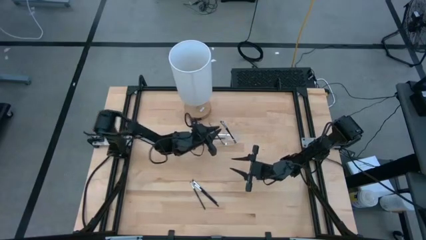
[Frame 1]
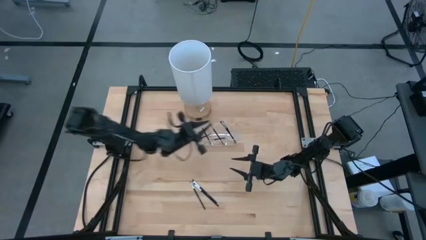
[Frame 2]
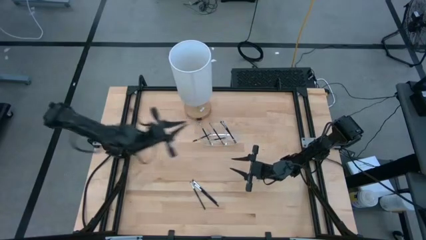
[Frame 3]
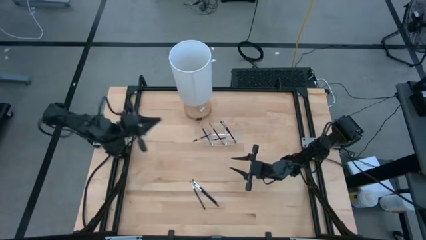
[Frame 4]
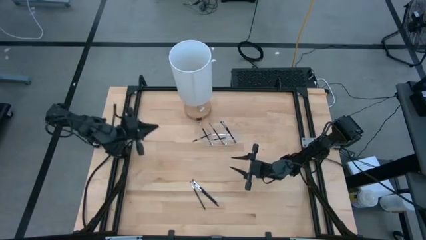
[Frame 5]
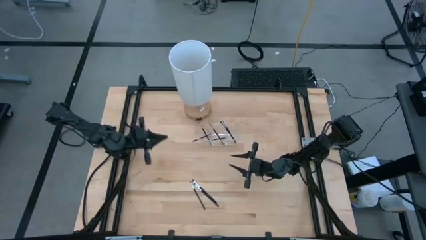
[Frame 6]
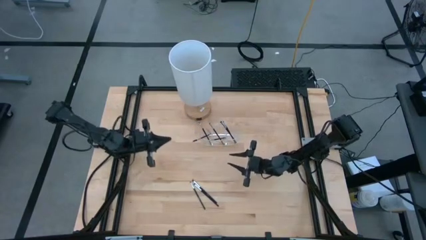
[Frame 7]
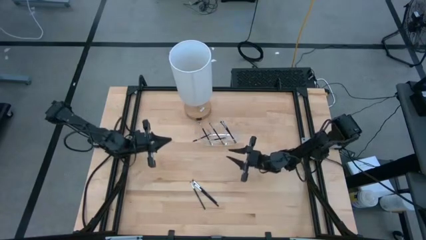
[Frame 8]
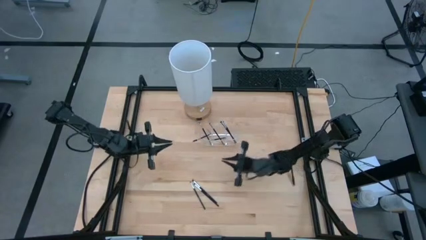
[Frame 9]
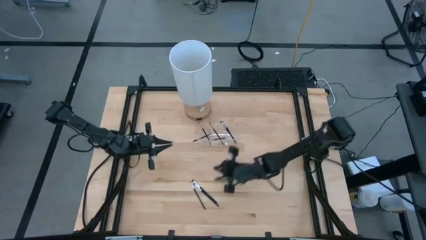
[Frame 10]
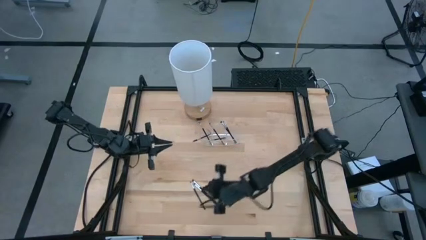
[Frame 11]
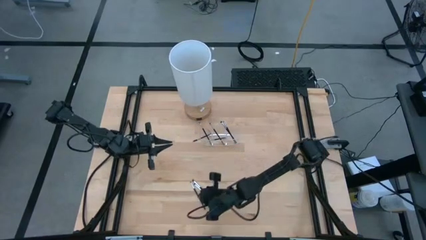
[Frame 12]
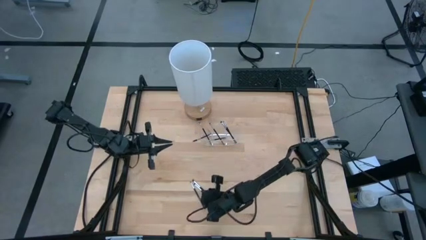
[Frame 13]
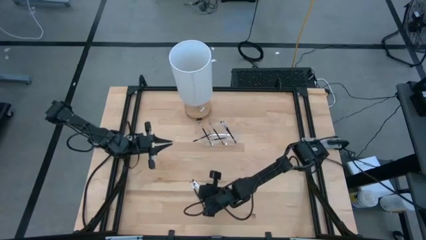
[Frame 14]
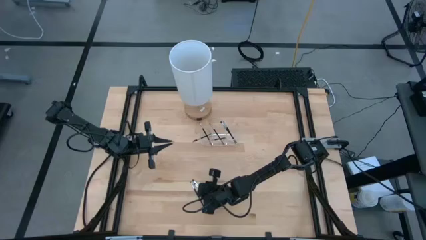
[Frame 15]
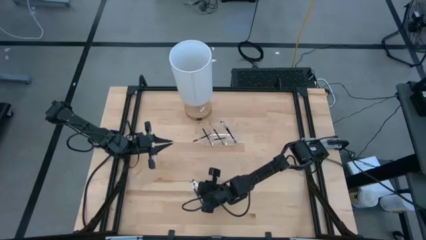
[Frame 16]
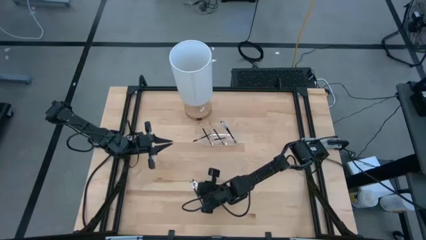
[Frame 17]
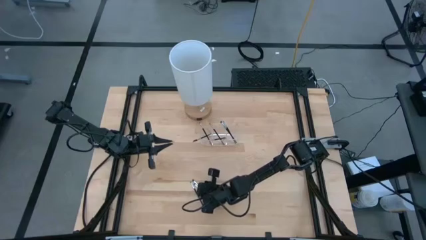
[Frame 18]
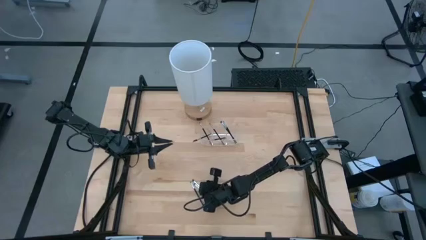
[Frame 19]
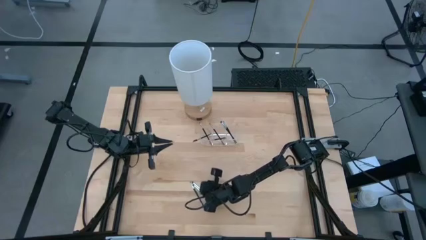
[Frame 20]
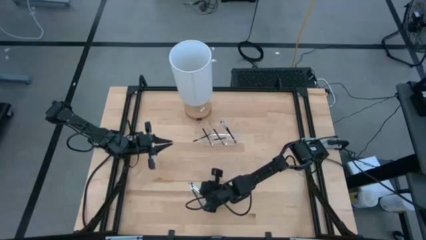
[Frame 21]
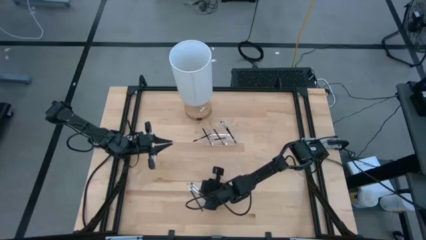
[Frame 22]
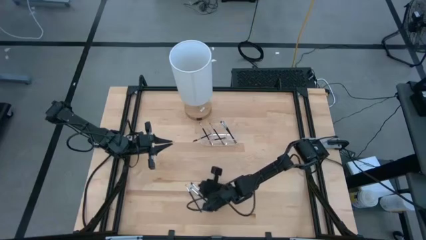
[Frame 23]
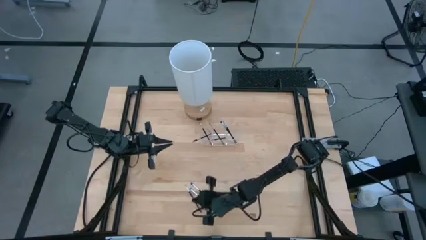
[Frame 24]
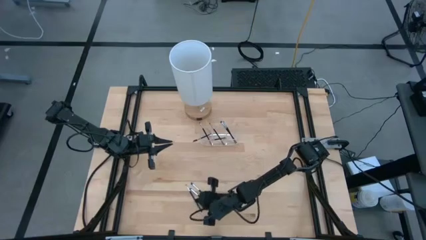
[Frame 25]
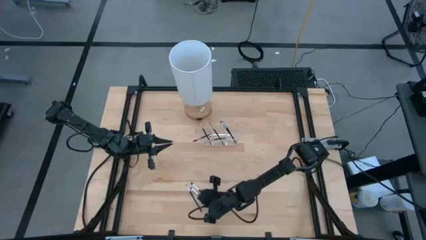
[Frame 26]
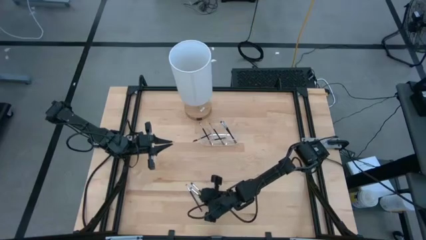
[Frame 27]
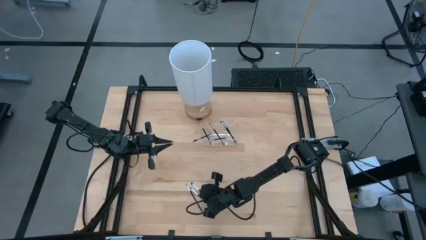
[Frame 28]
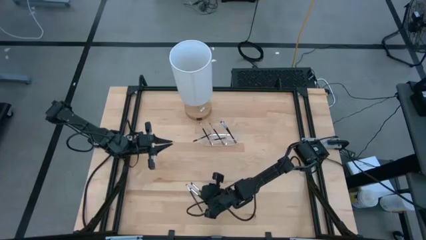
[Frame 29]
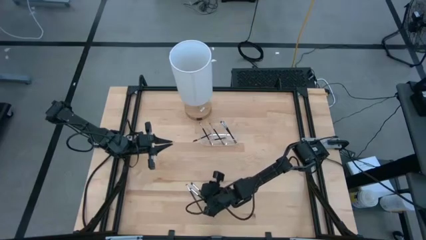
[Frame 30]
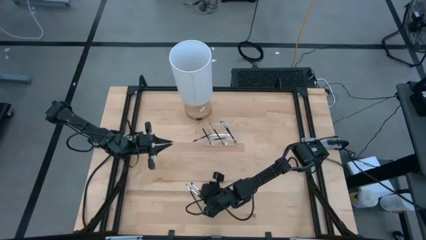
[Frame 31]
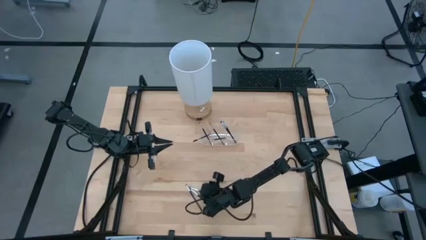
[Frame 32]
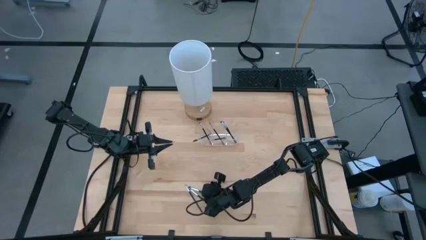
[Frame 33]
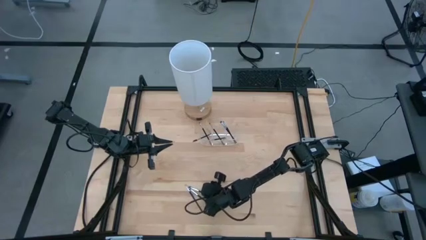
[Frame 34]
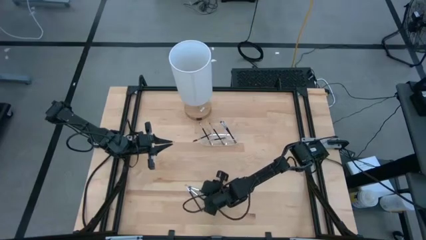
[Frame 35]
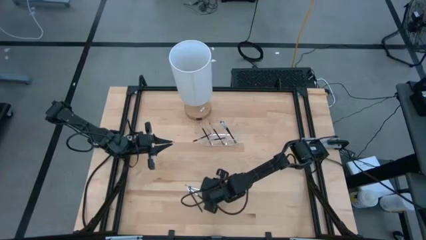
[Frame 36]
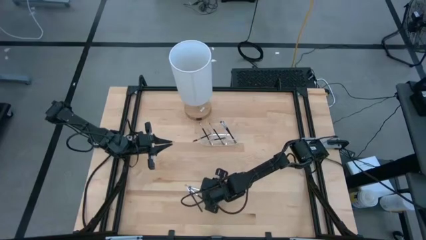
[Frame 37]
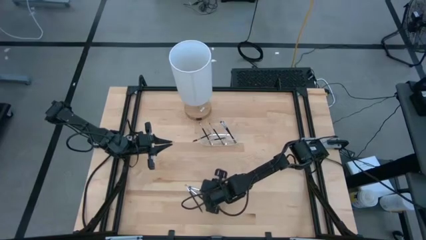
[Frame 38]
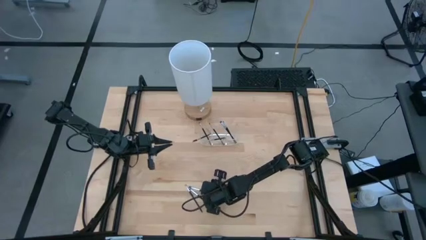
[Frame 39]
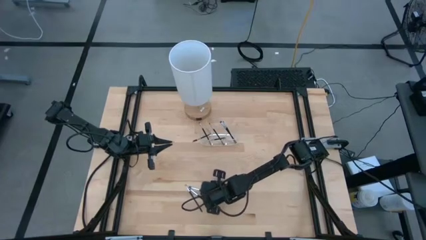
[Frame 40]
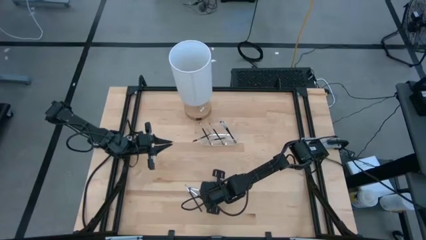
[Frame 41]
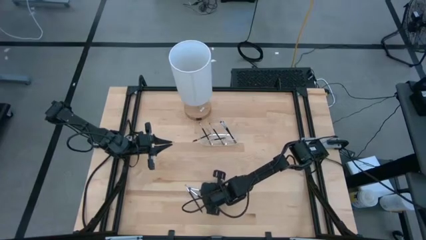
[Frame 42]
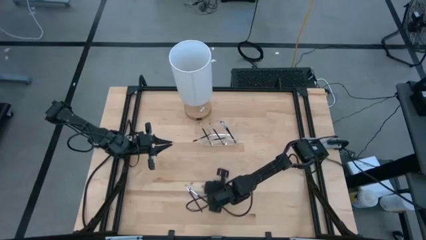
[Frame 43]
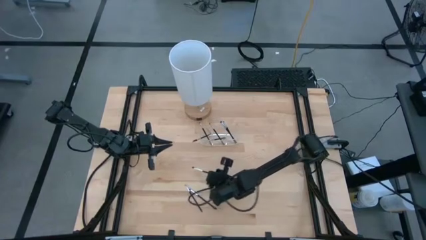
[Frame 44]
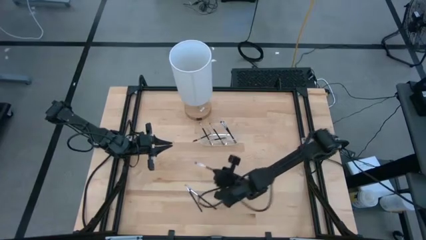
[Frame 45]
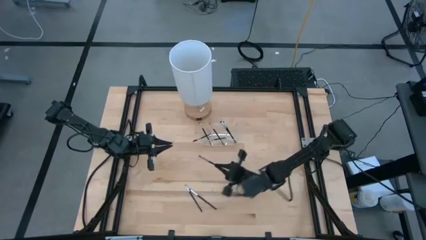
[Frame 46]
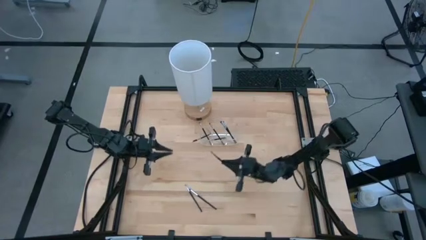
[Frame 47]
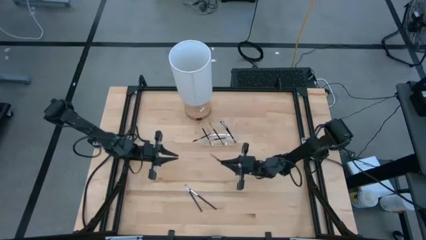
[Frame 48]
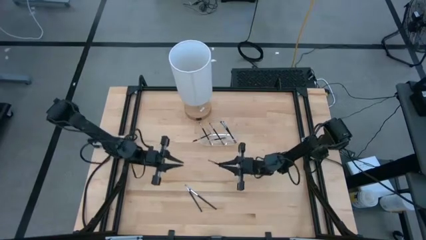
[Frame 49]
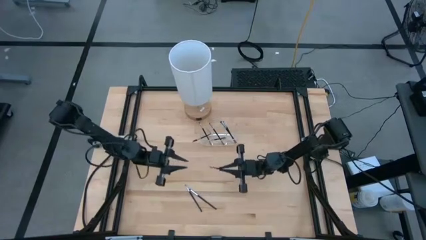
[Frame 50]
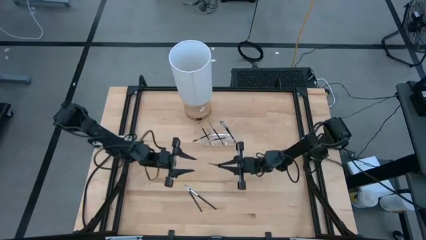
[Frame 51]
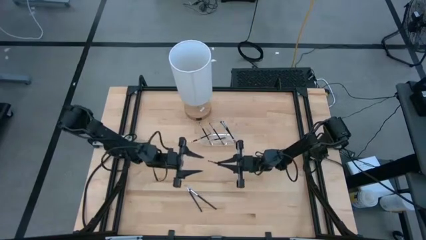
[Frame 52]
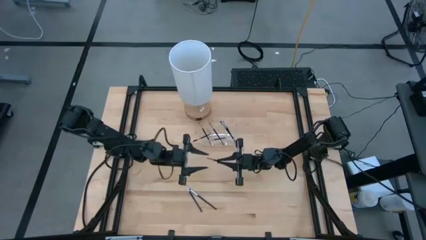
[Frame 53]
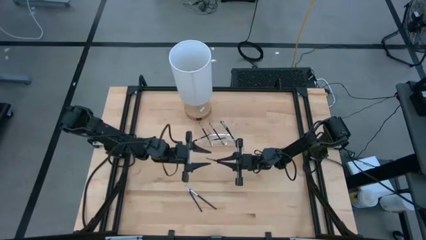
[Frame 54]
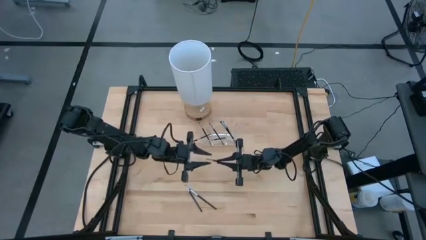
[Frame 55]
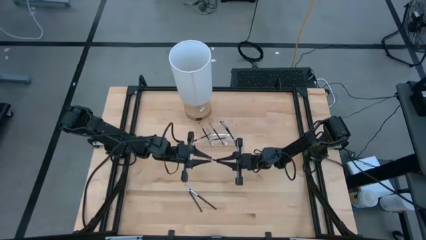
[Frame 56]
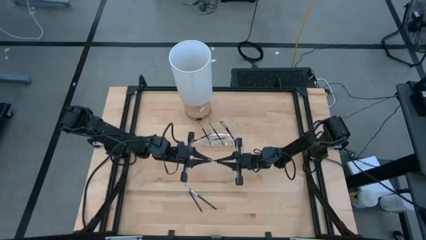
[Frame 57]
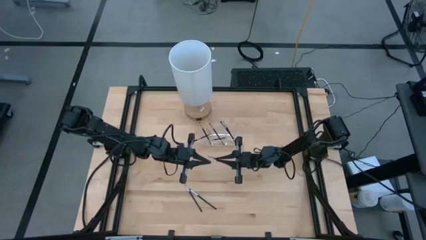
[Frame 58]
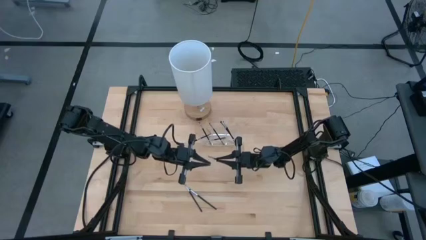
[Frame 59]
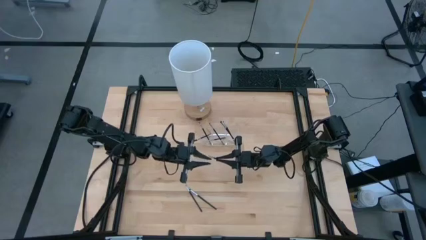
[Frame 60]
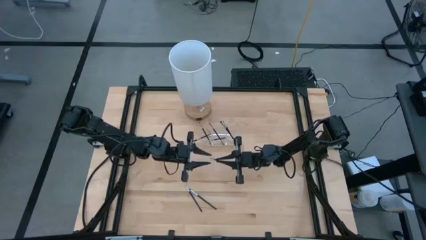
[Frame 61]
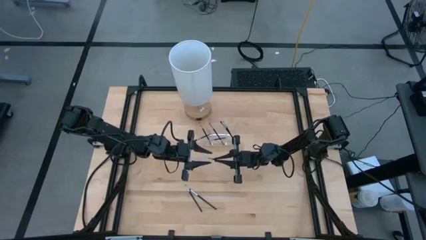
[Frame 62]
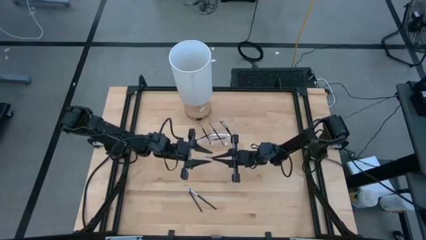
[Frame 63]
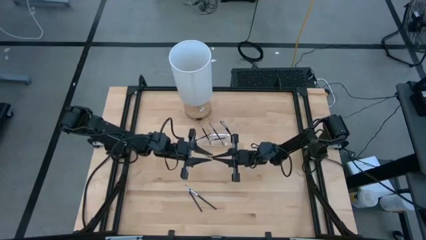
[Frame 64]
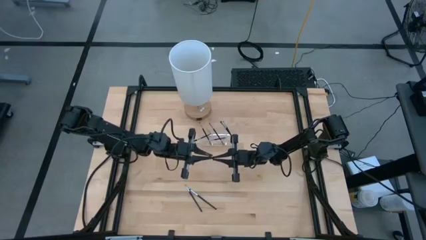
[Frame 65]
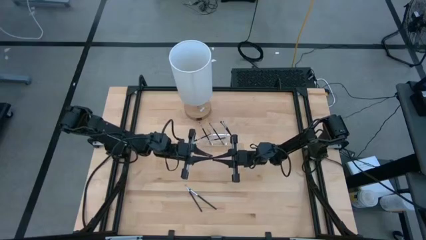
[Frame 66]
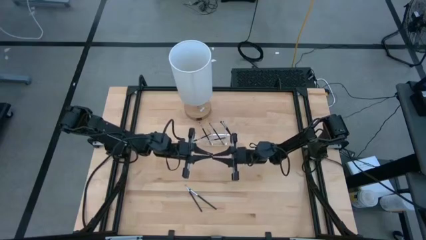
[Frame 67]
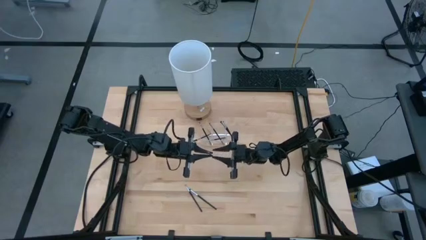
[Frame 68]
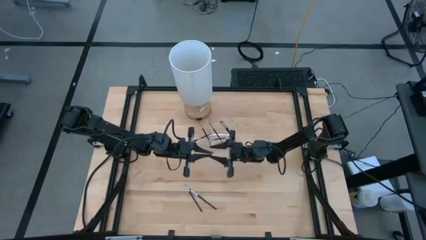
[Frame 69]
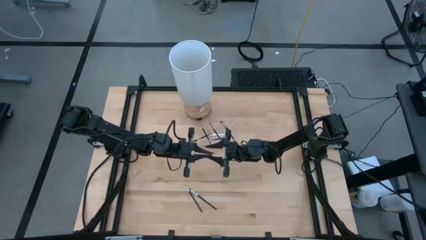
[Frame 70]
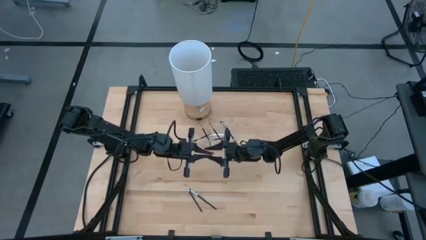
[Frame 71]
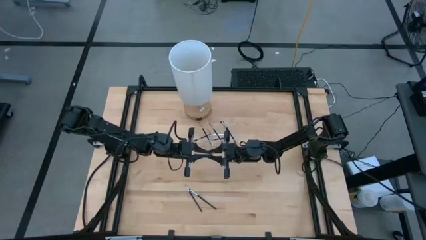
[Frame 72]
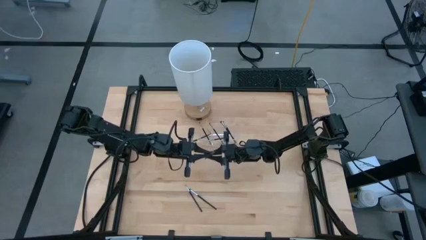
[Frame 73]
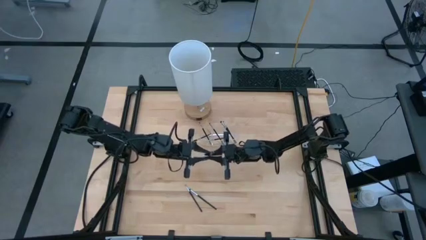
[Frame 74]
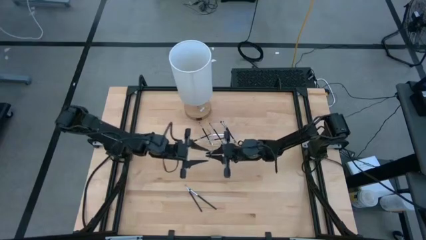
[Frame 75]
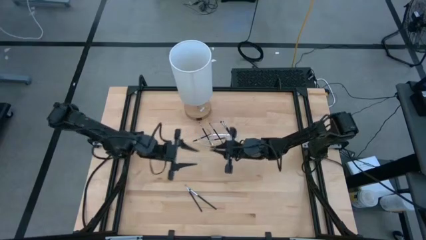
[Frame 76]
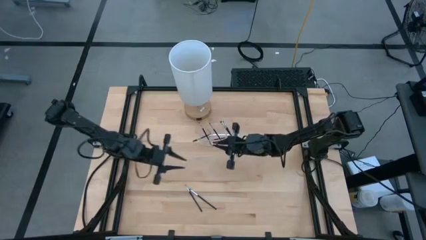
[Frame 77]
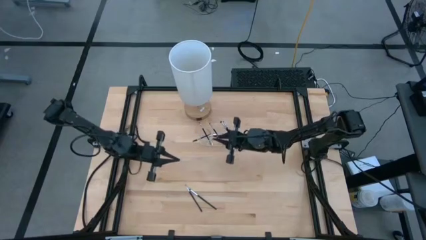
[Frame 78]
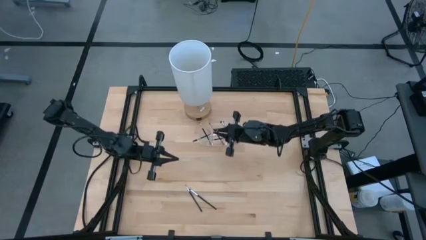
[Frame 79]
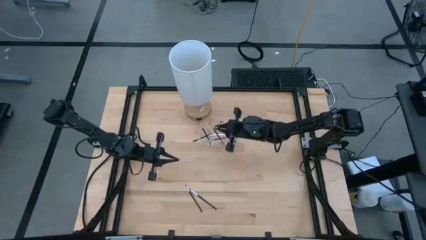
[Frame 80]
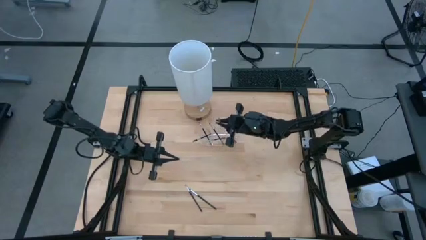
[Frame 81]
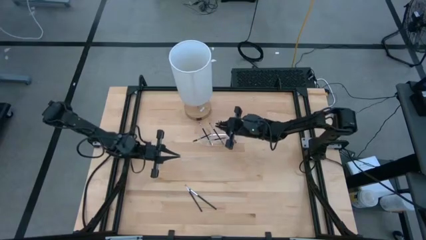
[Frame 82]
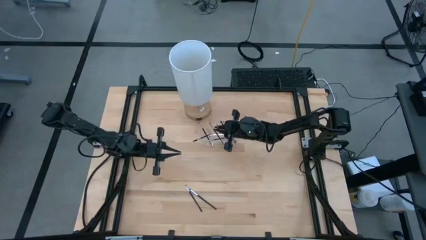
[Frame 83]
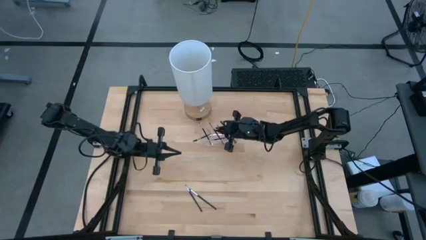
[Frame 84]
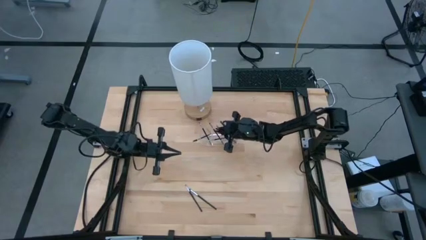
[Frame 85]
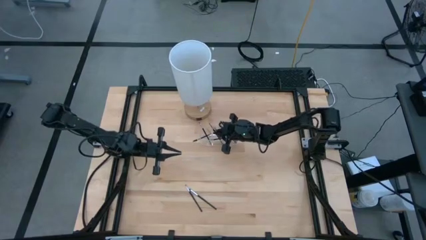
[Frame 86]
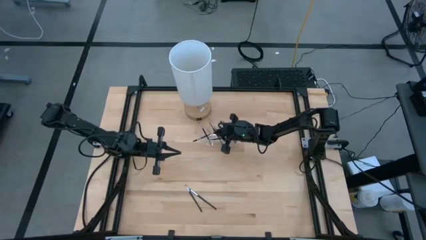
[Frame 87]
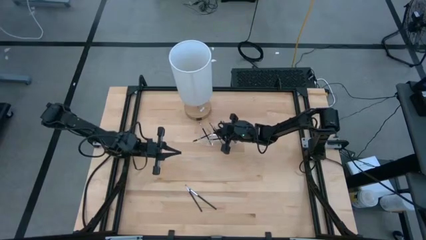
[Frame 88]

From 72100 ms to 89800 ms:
Task: Pick & Place Makeup Supplies
Put the makeup brush into the transparent organizer
